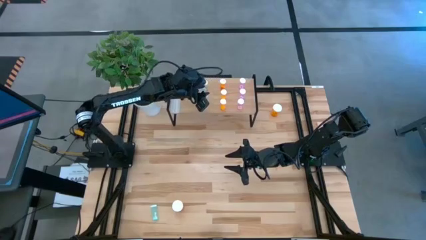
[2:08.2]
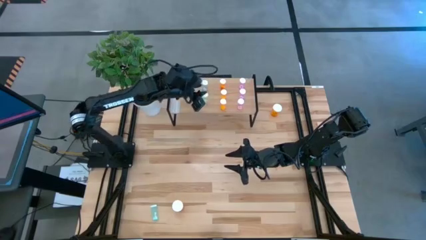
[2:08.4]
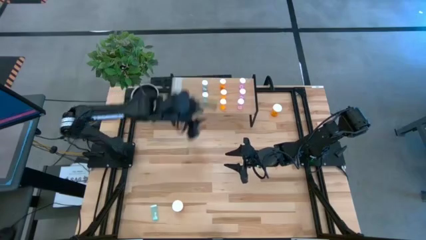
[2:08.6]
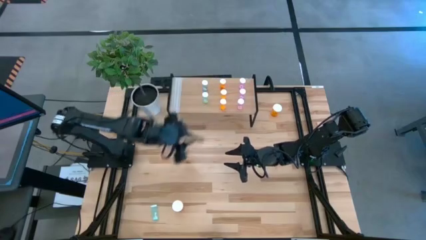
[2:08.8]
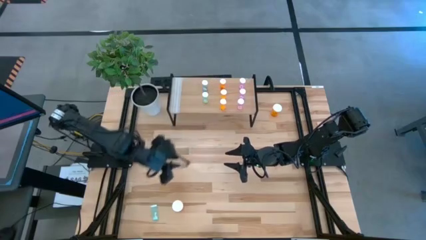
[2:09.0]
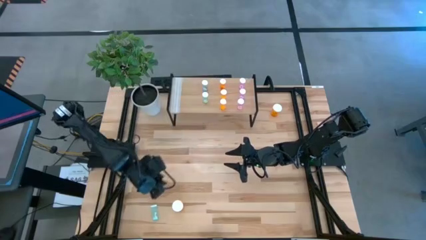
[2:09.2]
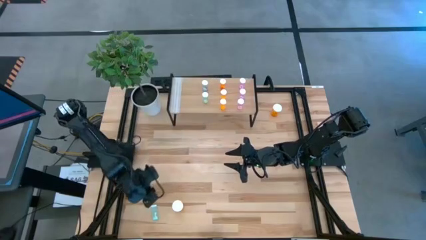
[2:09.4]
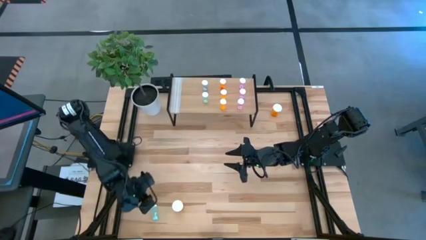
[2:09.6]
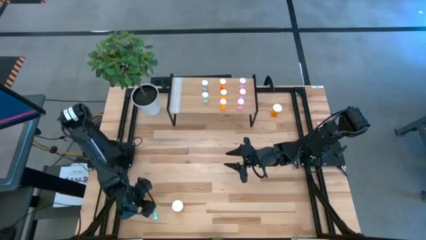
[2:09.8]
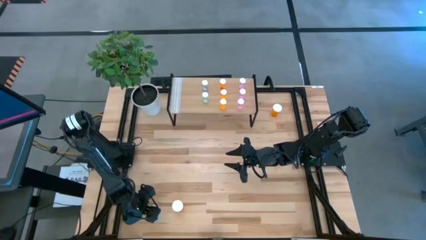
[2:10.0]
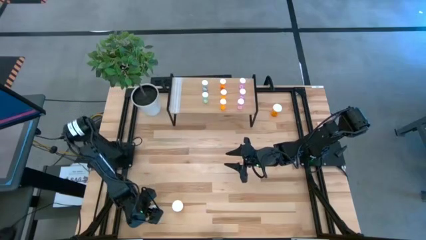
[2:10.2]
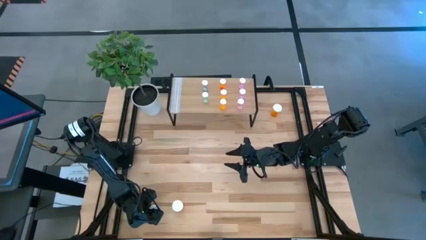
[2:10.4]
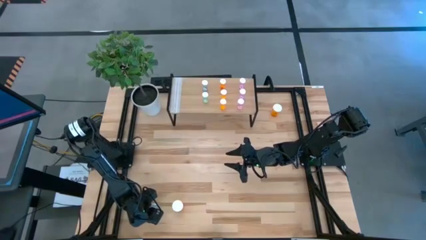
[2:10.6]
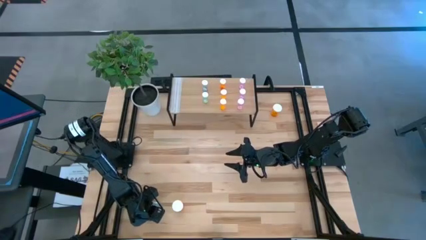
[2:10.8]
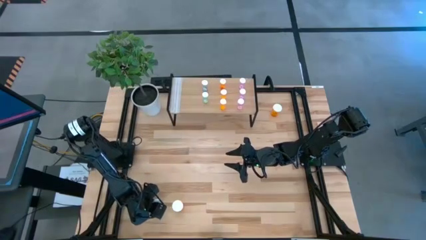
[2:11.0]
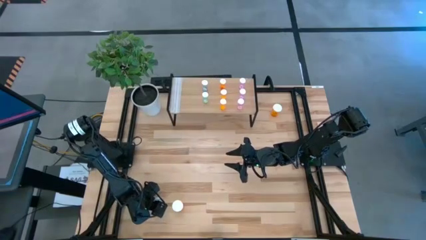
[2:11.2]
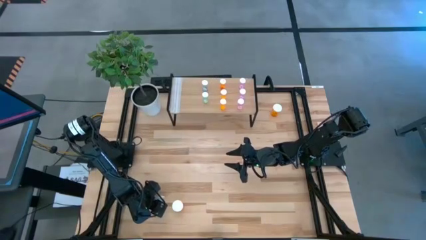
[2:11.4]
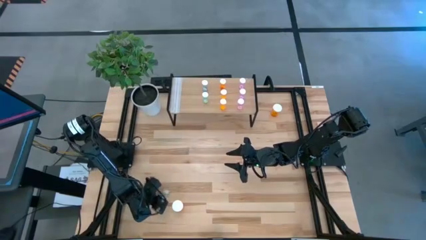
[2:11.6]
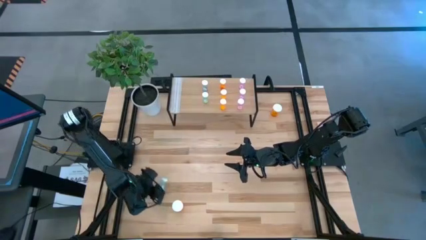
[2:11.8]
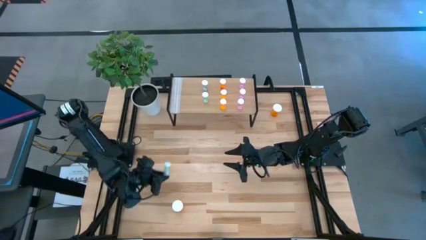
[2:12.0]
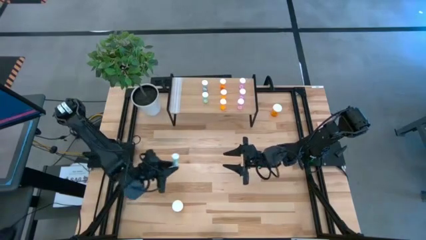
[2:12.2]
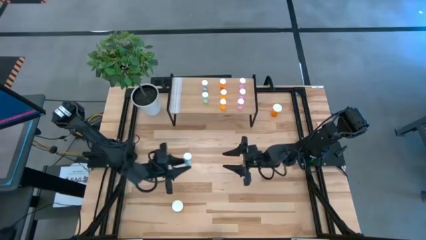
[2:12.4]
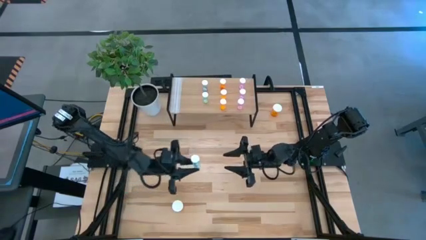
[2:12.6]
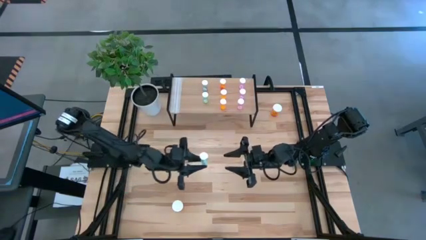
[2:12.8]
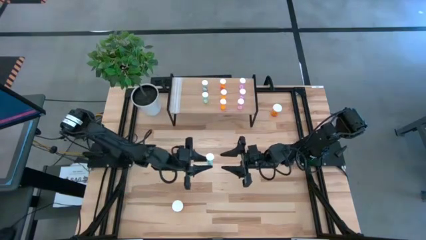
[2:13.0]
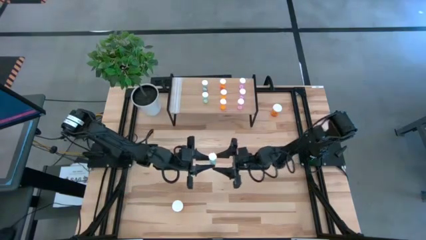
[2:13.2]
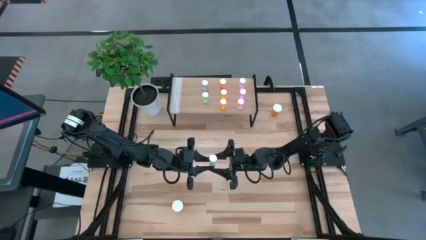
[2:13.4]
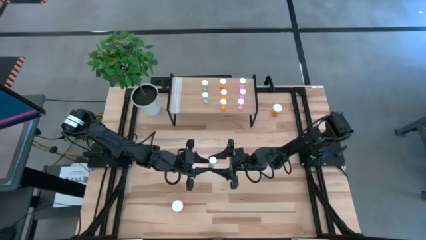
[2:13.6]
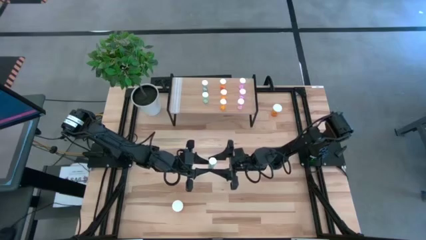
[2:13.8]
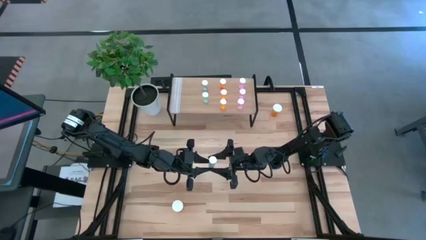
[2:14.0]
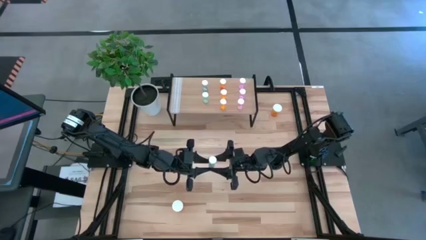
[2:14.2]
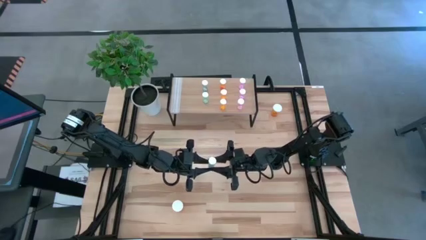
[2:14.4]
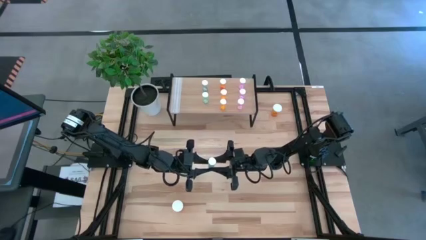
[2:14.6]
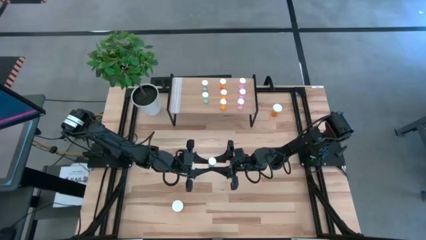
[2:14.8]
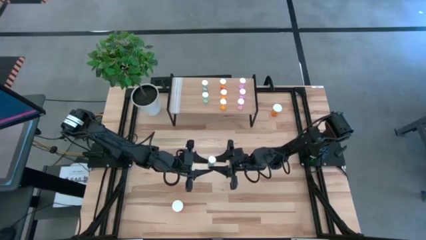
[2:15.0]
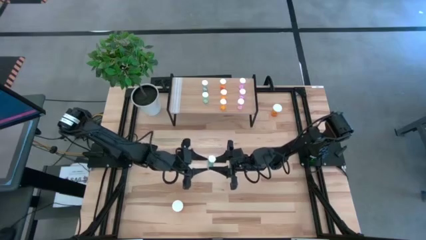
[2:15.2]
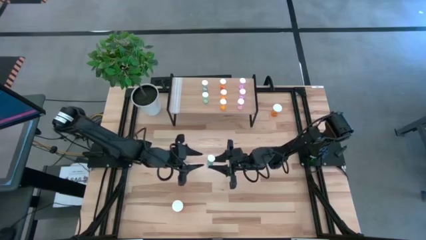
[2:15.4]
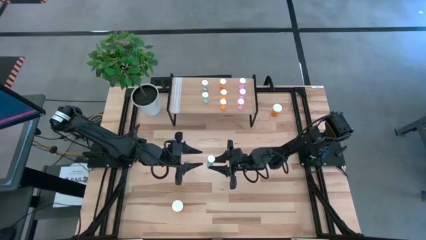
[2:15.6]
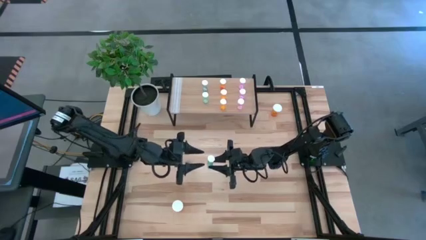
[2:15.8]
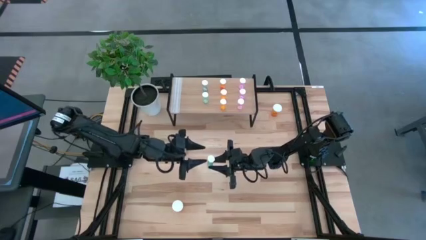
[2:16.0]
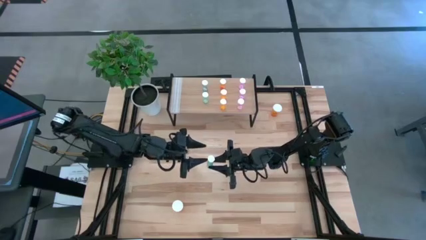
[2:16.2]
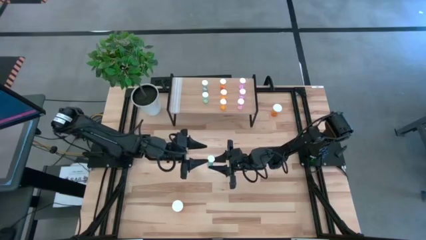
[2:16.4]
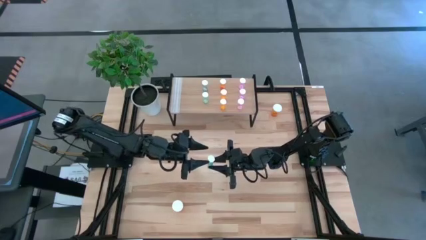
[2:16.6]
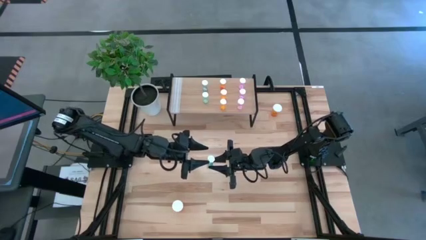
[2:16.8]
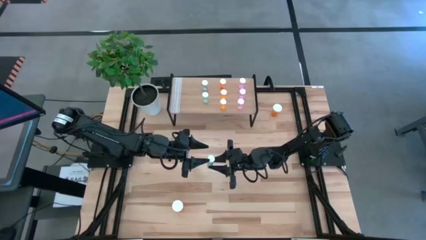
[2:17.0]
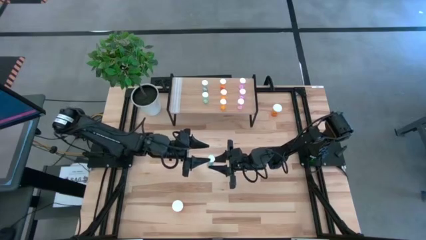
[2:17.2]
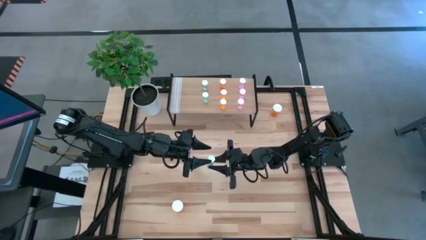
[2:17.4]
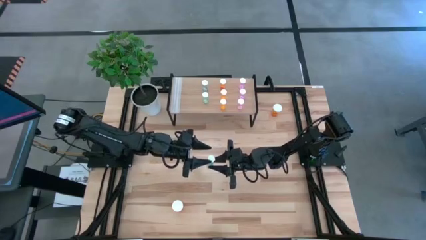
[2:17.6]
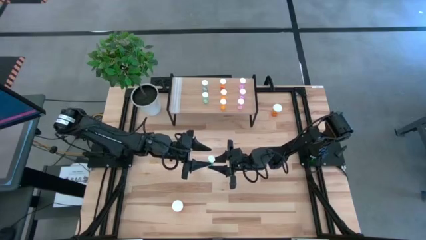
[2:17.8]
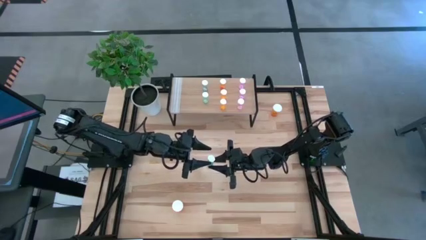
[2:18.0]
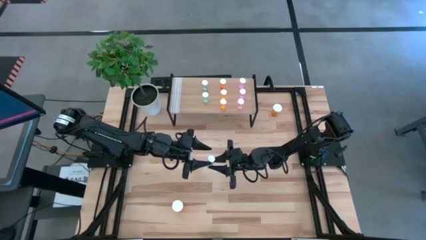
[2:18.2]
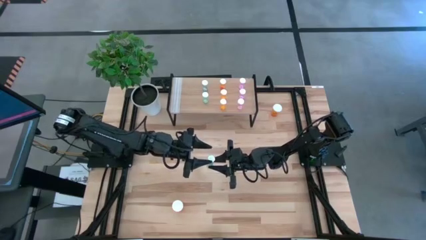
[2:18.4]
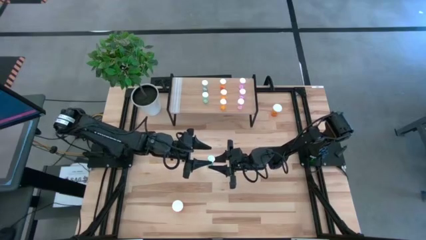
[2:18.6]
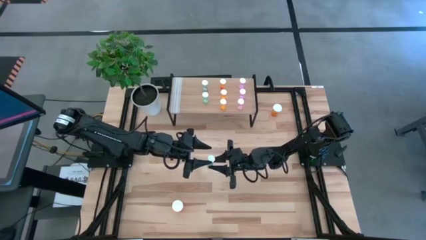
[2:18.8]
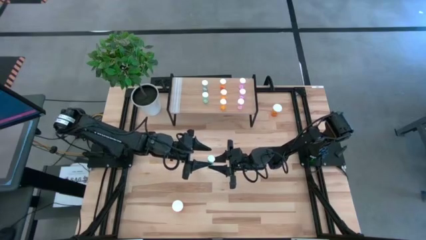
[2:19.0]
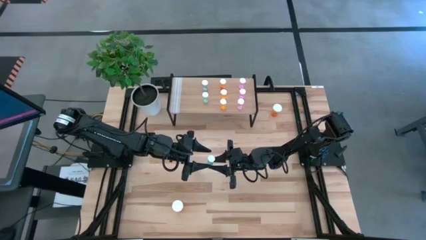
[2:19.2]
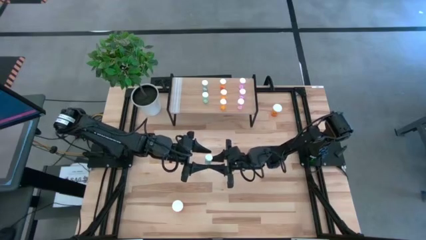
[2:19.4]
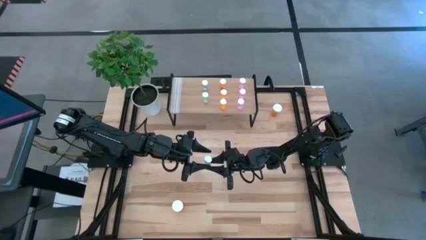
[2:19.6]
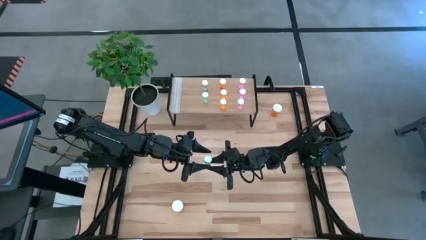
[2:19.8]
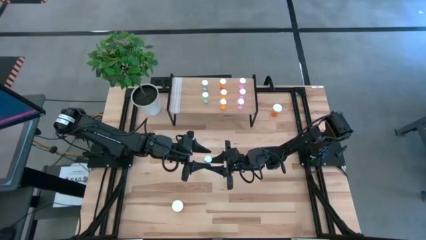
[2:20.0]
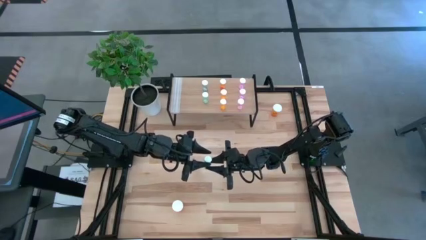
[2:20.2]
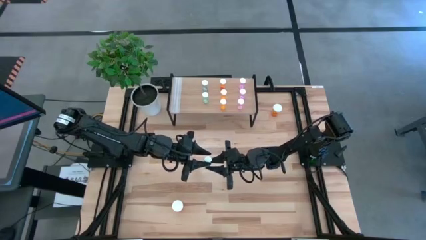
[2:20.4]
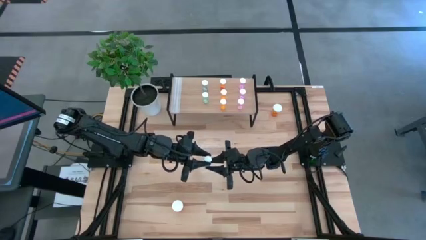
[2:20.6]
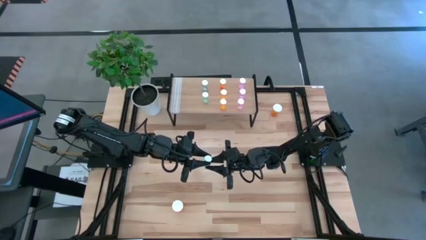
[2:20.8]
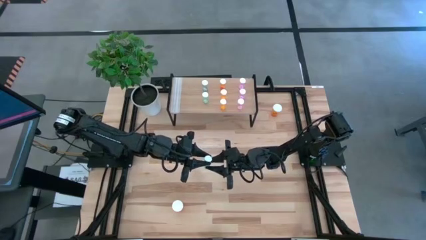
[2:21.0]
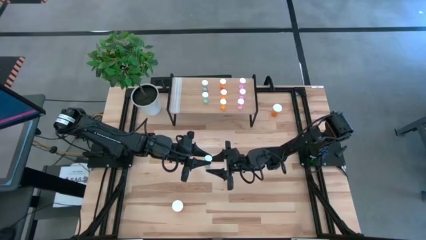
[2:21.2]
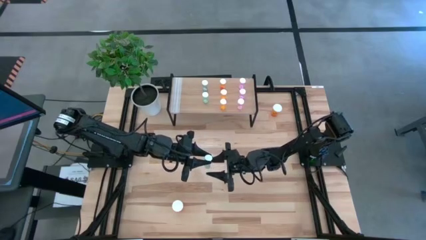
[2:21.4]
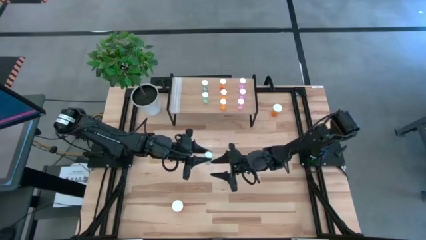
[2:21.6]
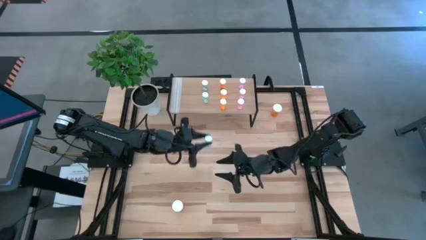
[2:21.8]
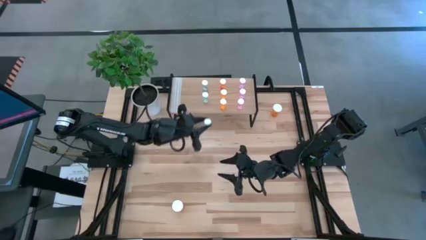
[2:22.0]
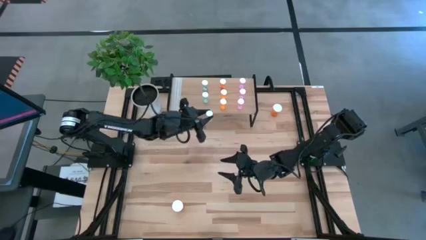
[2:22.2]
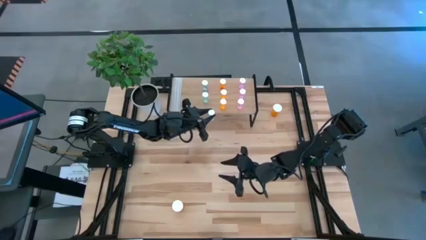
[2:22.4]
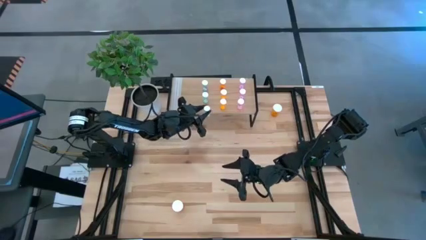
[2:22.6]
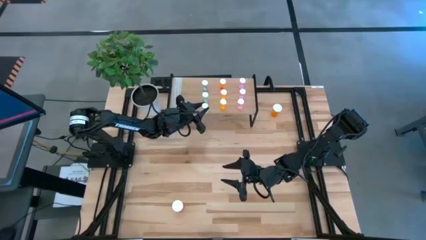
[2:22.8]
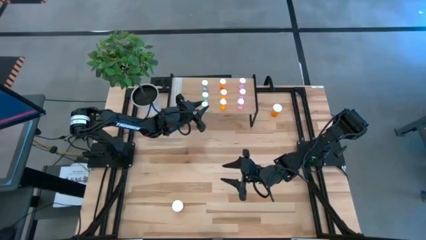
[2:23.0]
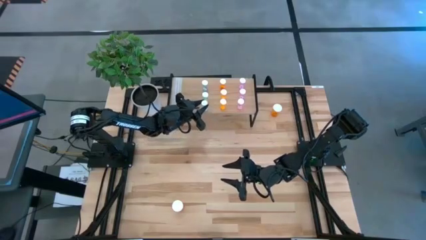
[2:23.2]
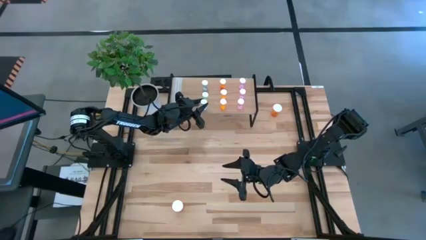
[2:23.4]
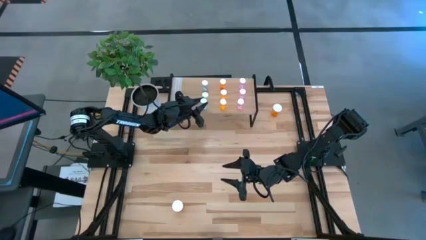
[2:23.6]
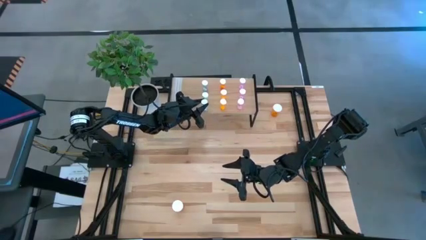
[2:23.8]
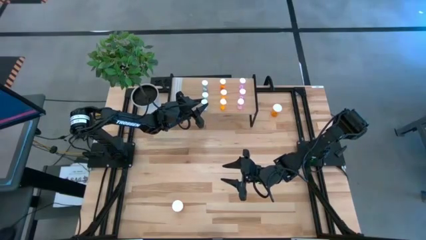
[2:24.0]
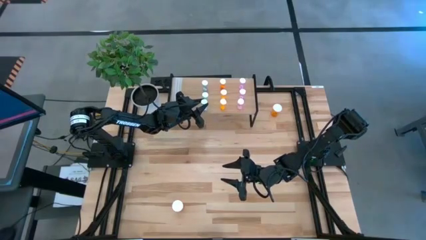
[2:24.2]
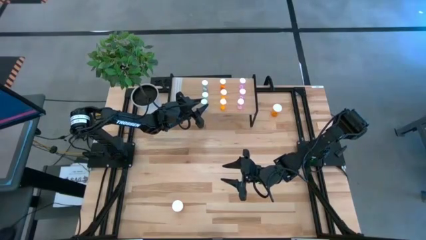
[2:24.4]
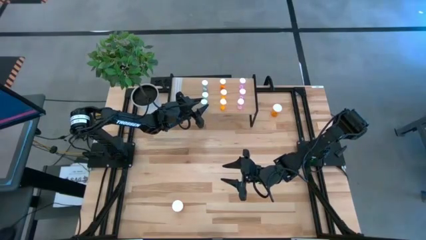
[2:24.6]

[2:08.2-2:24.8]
Task: Pick and place medicine bottles onto shelf by color
Put the blue pill bottle on the shelf aligned with the other blue pill bottles
